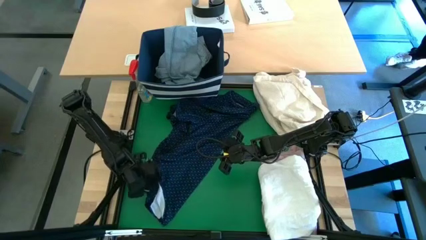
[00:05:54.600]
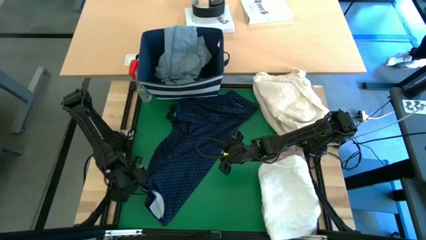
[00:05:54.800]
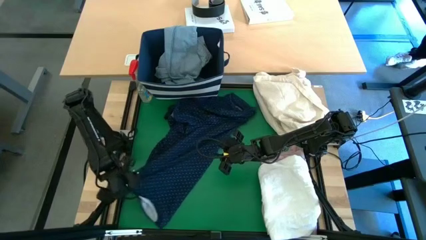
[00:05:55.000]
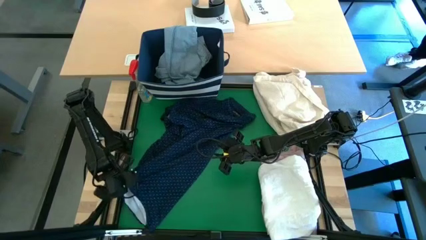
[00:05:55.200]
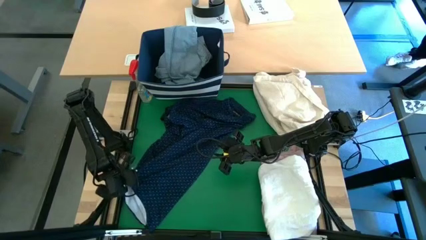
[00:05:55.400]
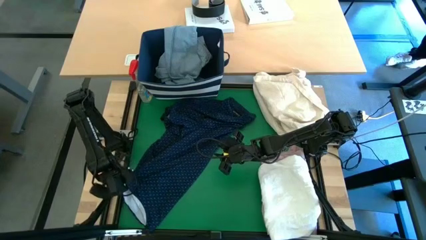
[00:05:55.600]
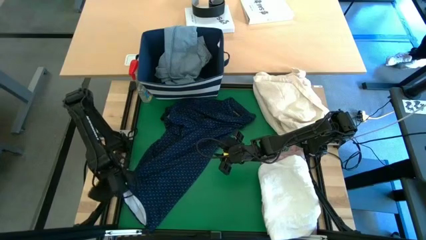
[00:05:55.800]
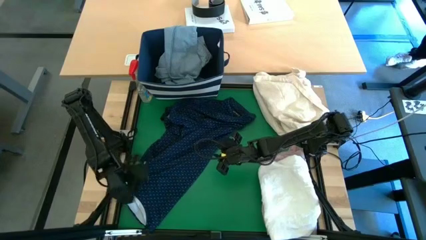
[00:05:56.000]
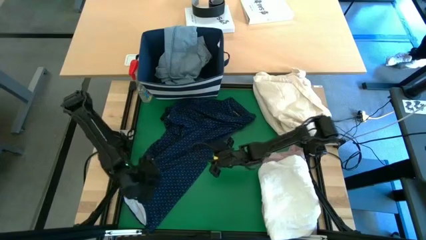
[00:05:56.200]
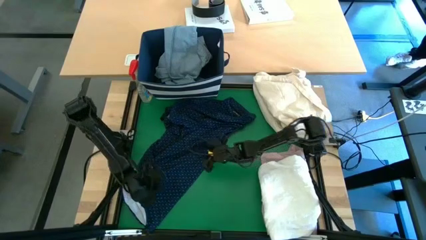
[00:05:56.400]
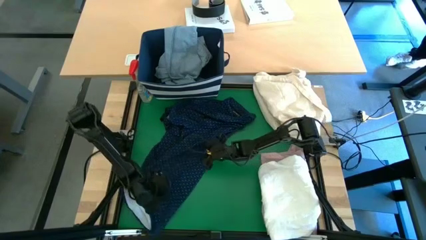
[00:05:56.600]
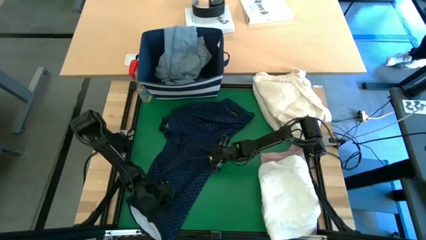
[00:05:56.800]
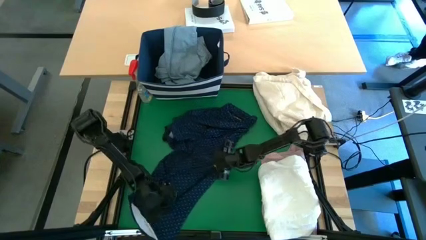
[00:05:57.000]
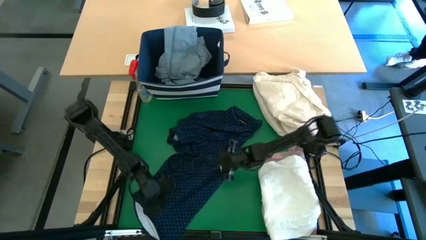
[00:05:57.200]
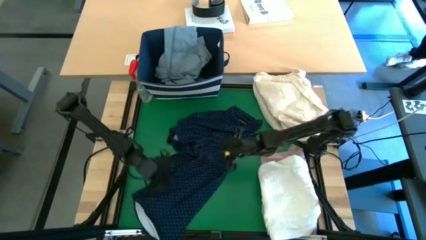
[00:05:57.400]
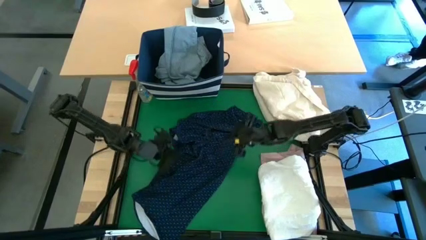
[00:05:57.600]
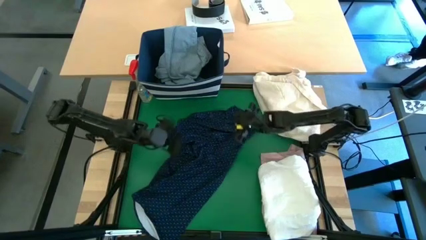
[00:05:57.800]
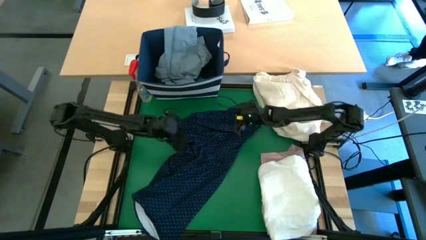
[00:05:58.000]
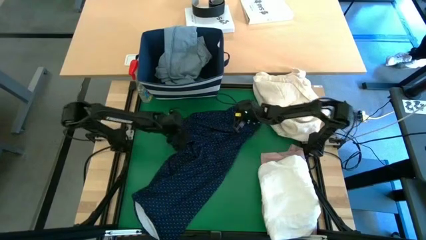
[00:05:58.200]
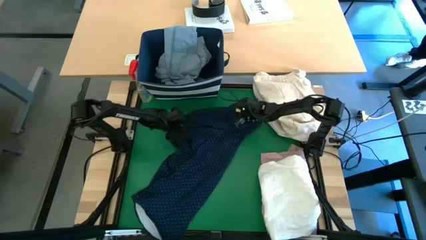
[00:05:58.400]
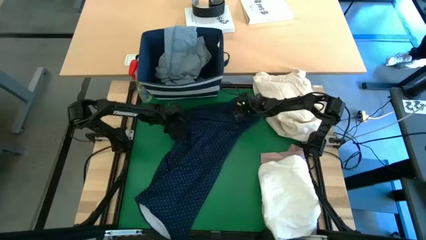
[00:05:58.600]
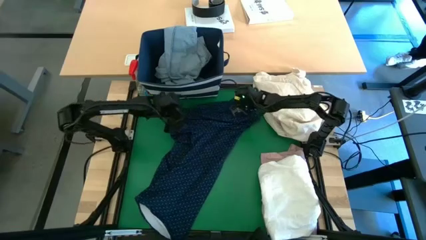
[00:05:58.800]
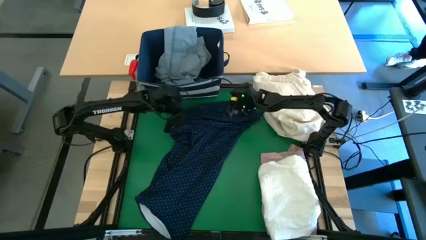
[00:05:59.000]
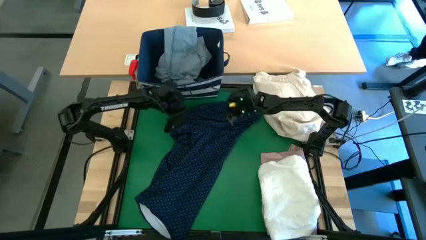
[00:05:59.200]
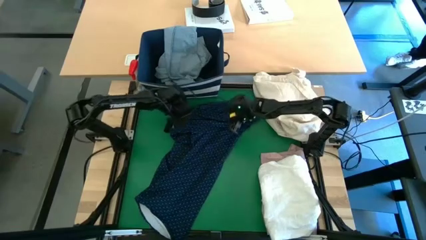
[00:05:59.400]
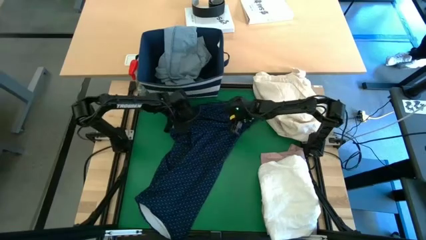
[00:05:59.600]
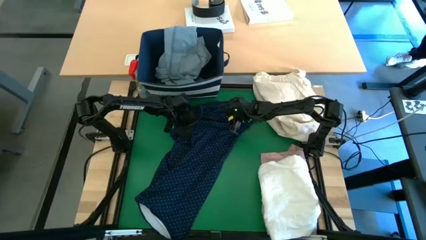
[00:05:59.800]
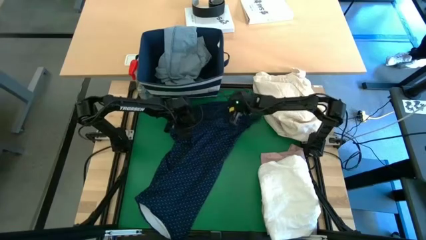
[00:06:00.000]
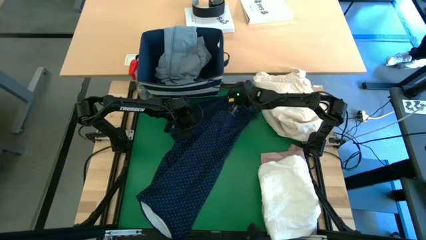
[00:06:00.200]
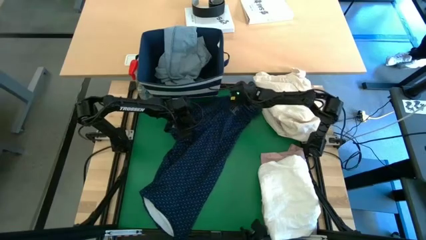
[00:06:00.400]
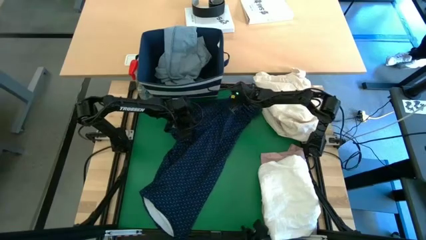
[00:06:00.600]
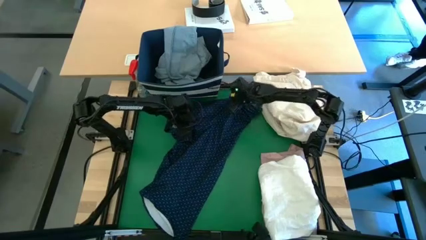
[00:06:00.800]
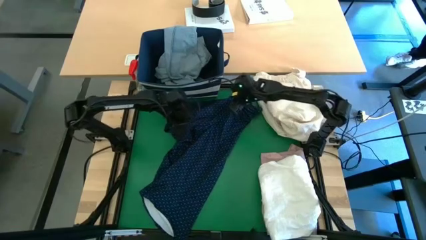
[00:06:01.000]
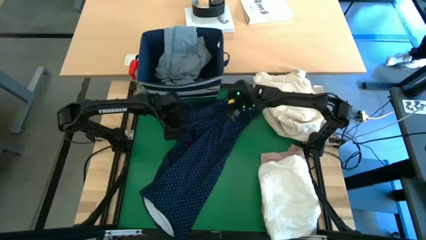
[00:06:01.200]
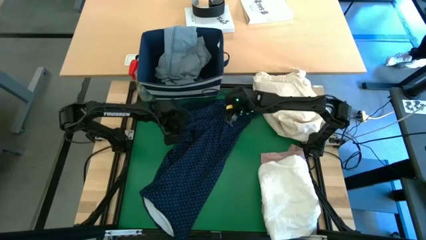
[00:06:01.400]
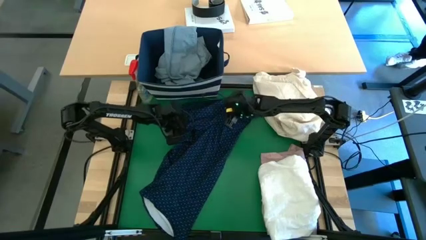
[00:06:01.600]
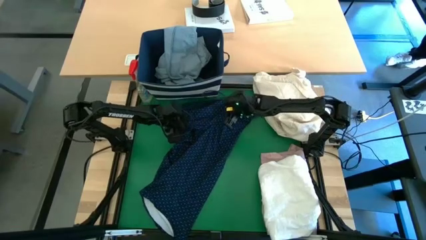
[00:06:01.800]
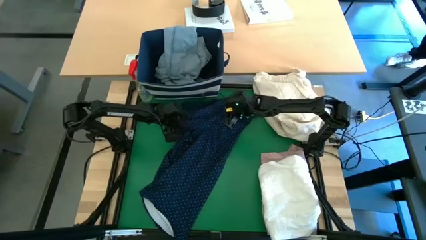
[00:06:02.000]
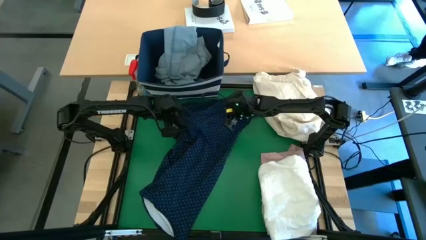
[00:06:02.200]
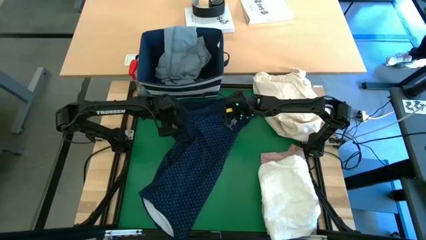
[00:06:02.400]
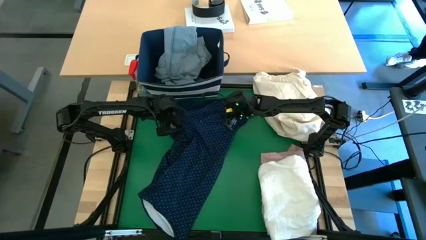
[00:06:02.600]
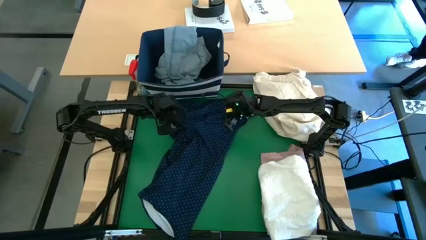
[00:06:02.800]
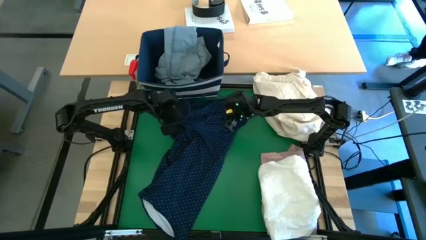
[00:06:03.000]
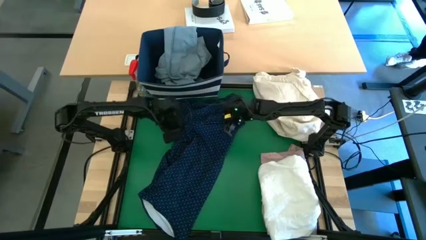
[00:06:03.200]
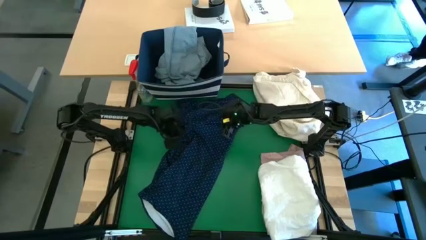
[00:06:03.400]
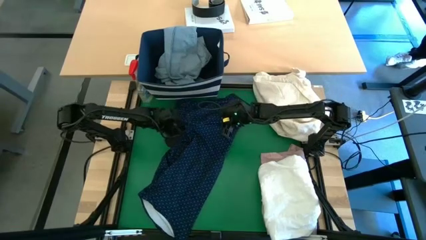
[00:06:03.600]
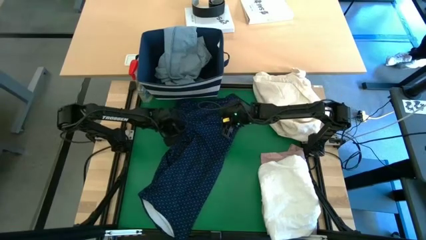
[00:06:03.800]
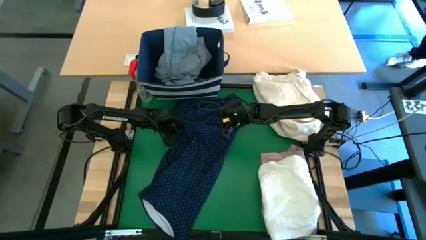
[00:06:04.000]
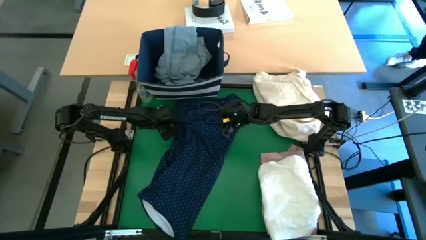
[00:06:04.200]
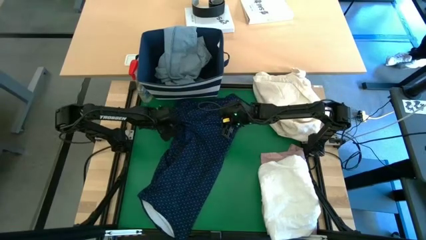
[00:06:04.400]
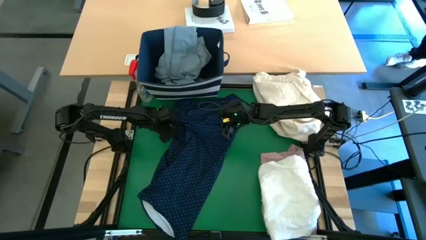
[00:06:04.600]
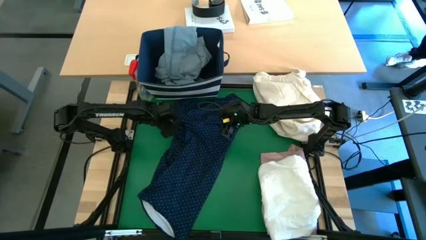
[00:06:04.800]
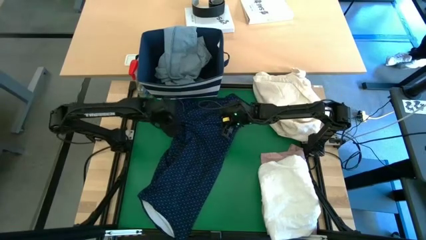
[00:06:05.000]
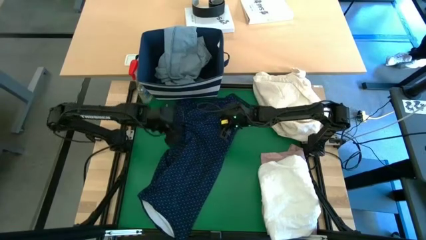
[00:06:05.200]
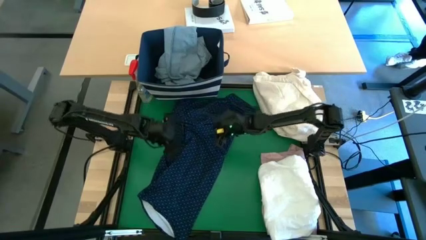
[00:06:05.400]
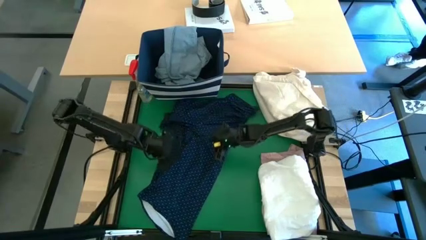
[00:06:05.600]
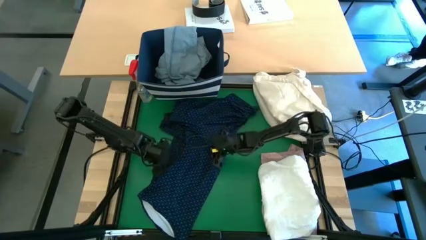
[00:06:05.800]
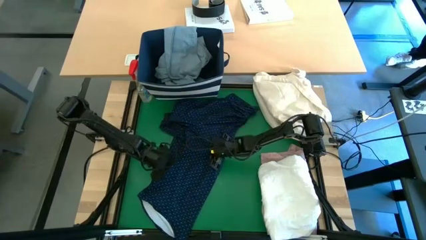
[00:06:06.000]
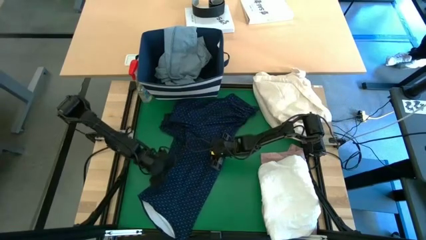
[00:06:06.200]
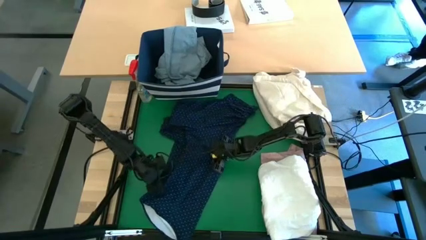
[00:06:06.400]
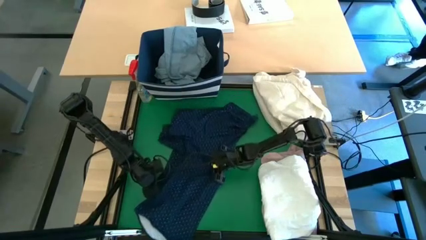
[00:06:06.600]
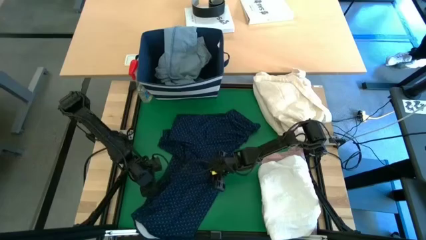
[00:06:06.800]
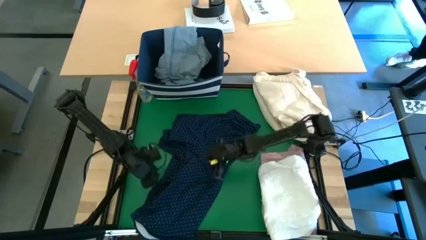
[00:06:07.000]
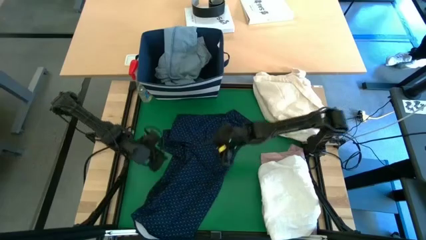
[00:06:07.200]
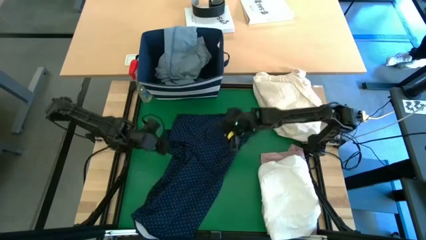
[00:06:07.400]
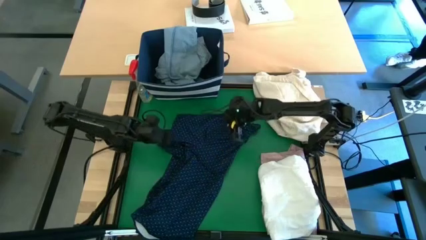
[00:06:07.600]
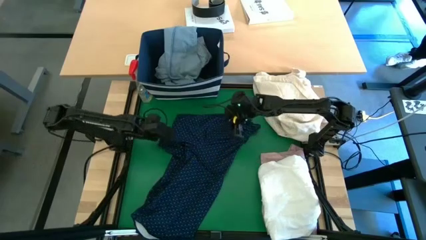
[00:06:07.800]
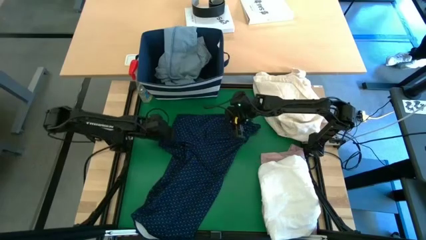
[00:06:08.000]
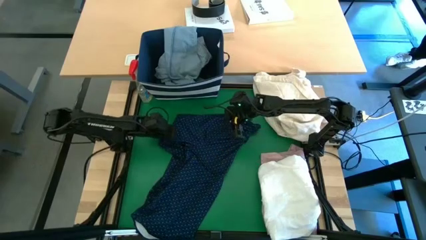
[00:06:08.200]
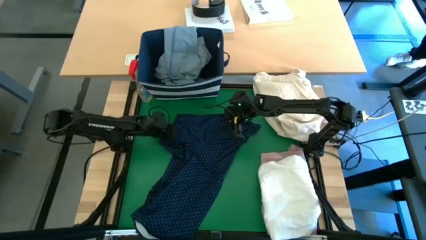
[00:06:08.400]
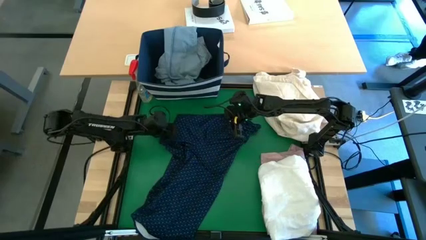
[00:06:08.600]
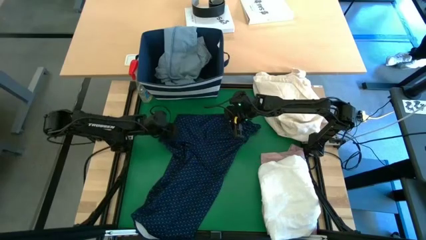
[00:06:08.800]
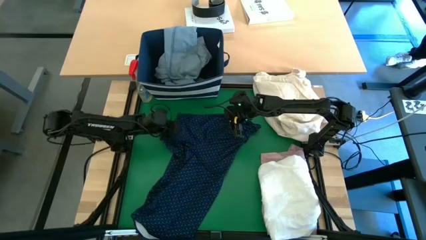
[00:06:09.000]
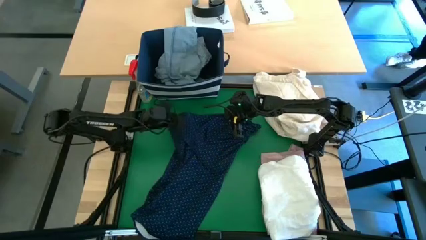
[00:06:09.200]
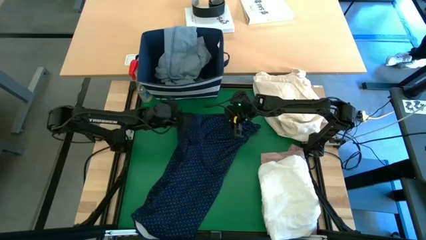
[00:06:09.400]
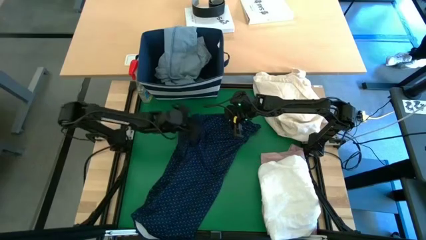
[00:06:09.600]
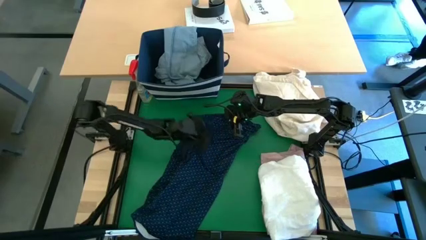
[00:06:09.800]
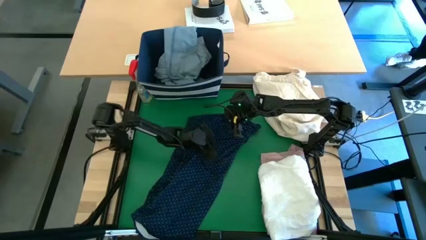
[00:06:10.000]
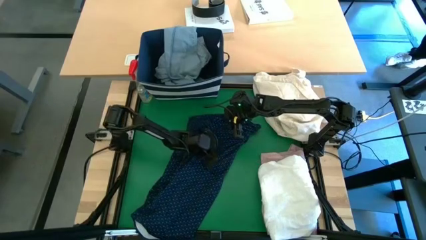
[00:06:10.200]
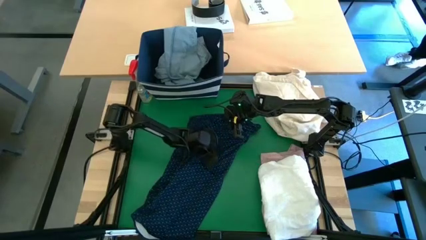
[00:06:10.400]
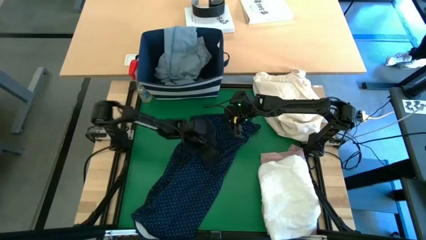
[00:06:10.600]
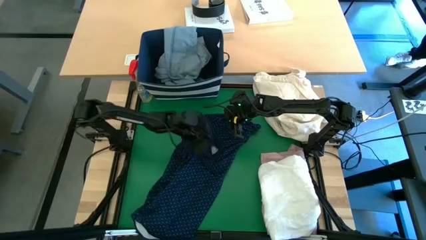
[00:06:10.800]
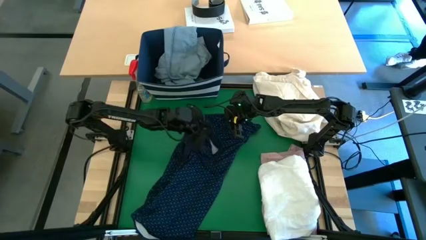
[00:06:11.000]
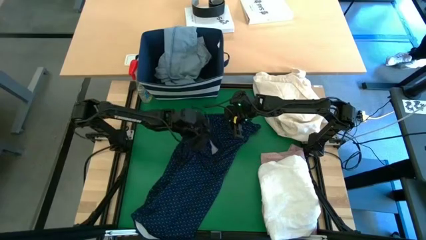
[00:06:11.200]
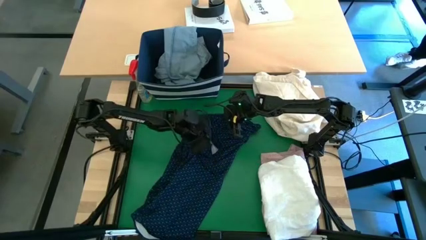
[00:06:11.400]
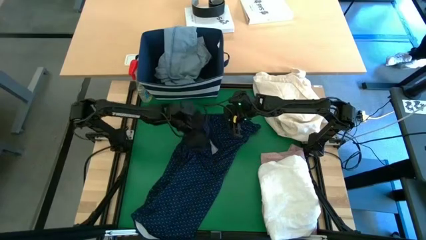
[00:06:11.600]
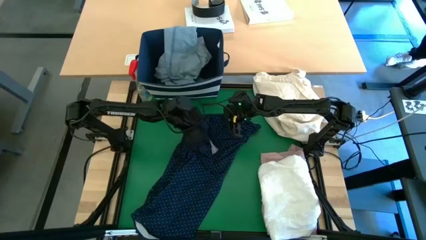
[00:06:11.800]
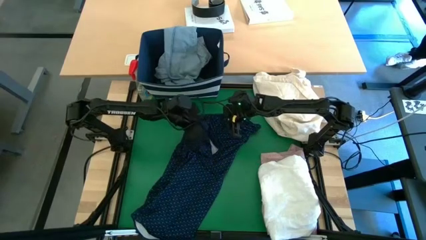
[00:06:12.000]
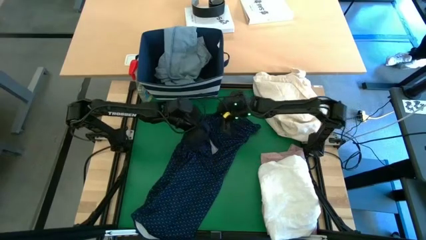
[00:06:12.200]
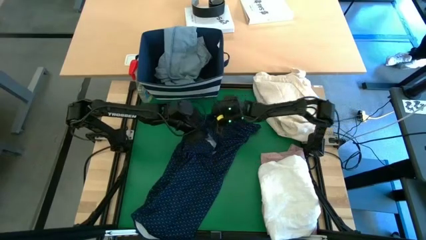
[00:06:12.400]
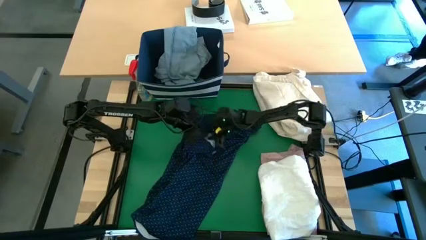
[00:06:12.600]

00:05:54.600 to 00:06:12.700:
Task: Fold laundry
Fold the blue polo shirt
